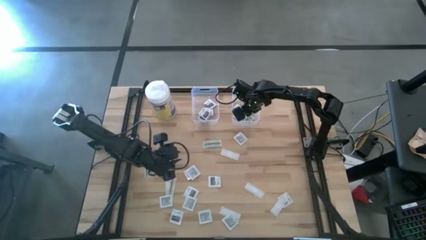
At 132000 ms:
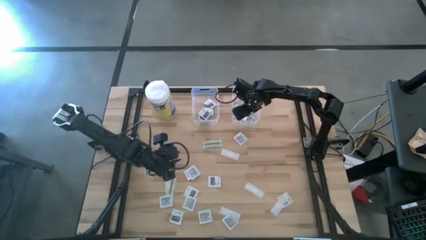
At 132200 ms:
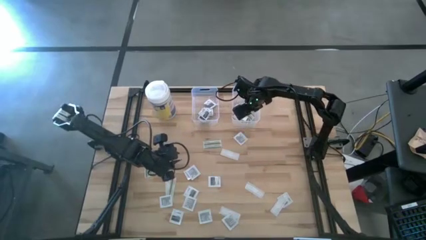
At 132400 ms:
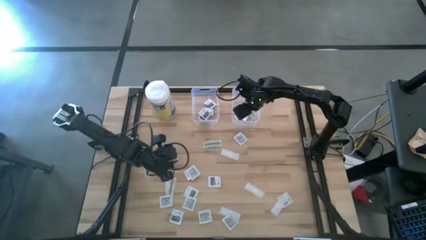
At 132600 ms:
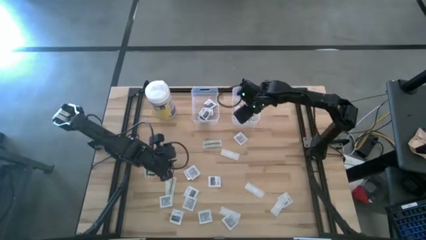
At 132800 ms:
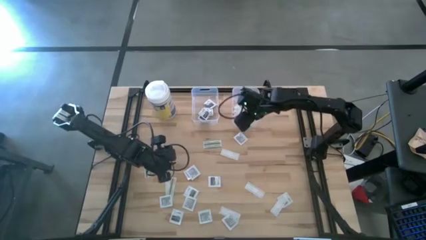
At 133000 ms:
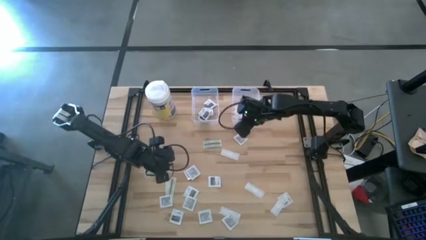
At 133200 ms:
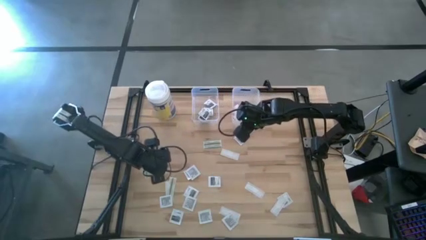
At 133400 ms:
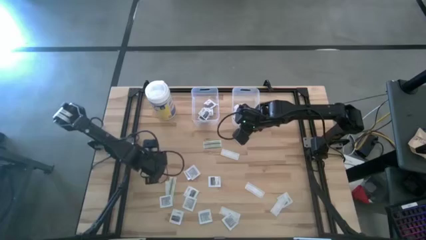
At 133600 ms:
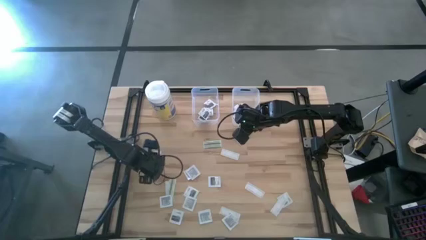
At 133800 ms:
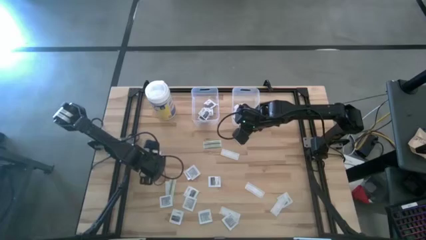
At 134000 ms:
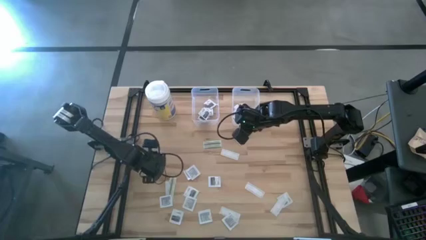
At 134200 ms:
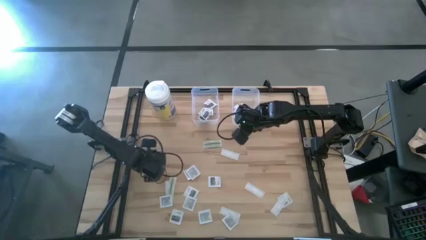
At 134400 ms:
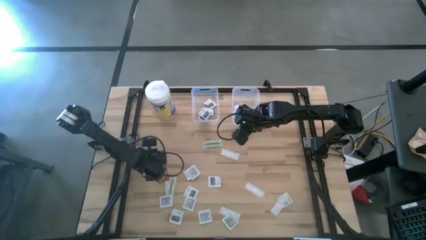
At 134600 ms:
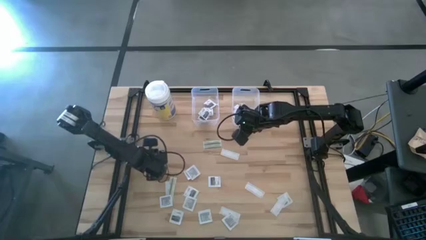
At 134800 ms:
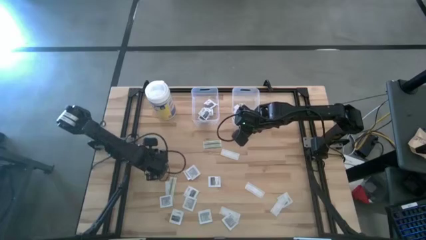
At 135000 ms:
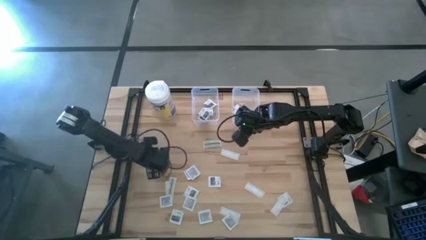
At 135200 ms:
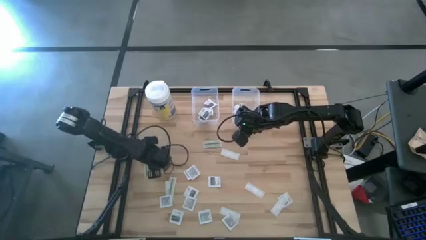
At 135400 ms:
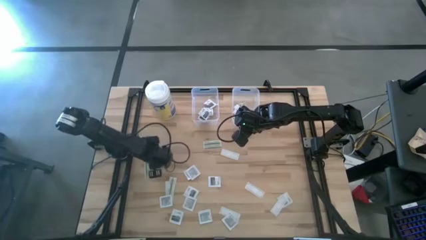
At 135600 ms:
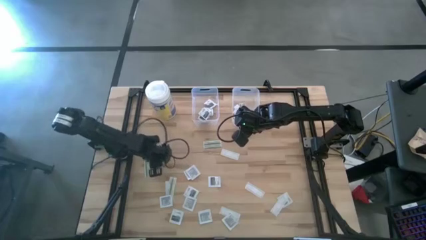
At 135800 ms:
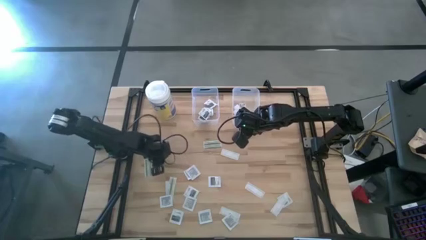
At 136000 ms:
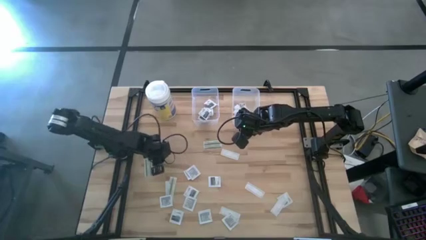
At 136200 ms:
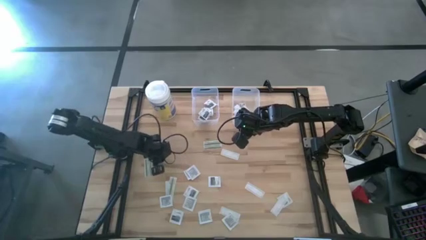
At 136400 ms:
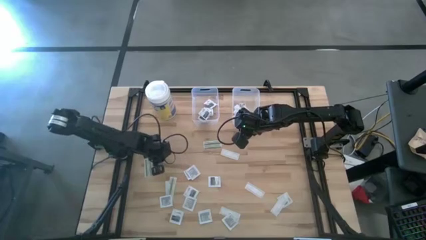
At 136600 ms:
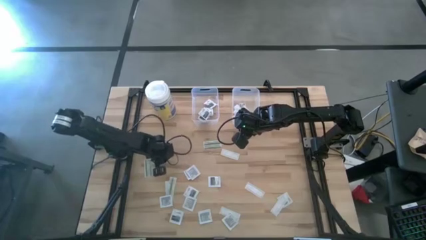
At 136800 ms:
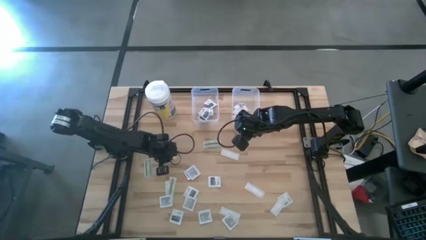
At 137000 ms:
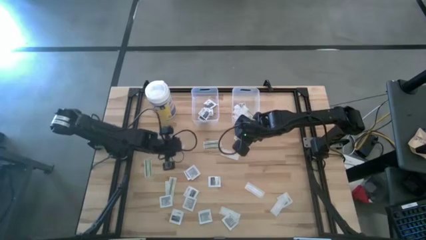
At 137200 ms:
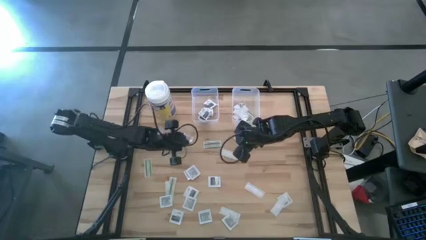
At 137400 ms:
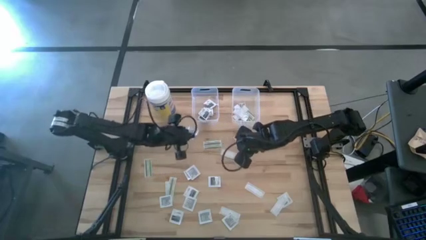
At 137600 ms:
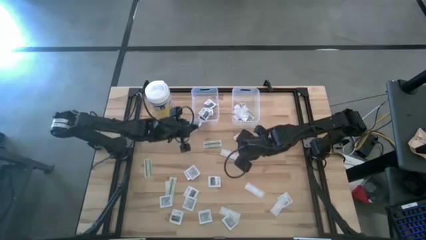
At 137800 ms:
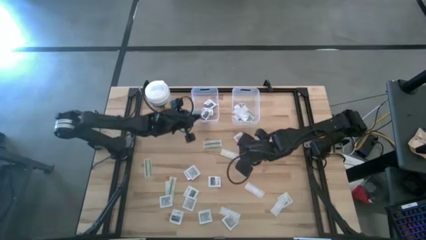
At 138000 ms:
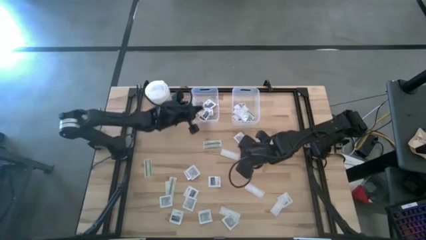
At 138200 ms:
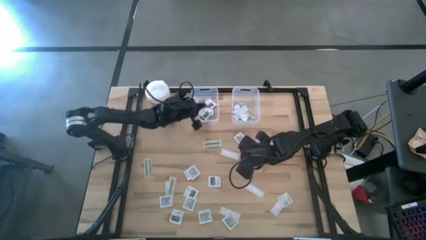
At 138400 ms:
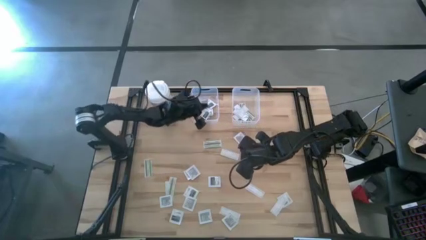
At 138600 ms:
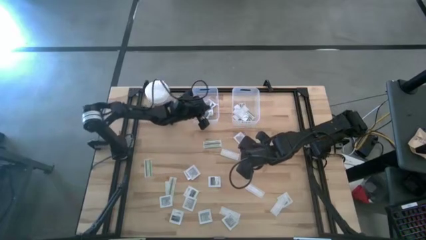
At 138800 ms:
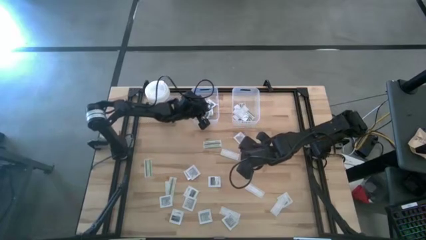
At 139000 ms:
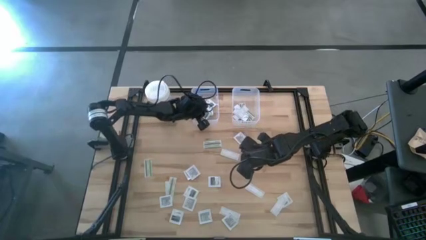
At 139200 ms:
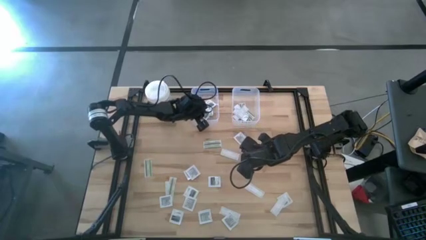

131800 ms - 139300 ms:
Task: Pick & Place First Aid Supplies
Put the towelette pack into the left transparent bin

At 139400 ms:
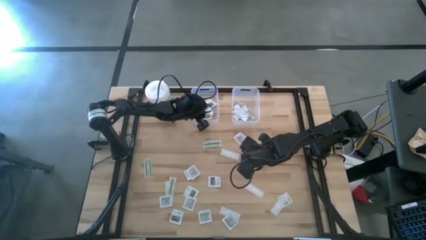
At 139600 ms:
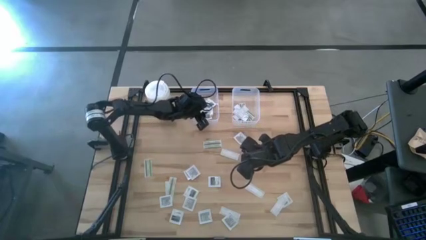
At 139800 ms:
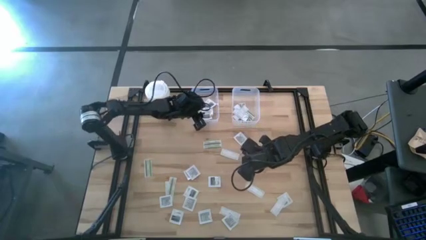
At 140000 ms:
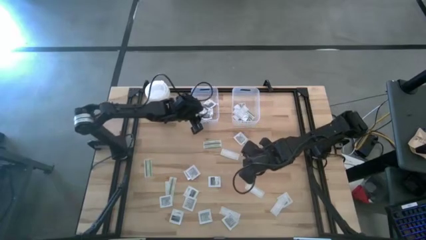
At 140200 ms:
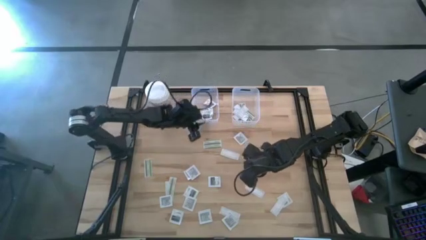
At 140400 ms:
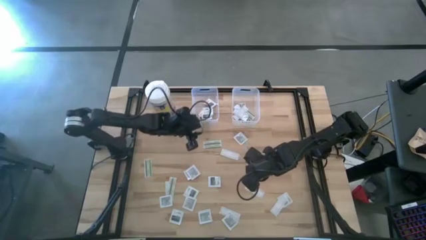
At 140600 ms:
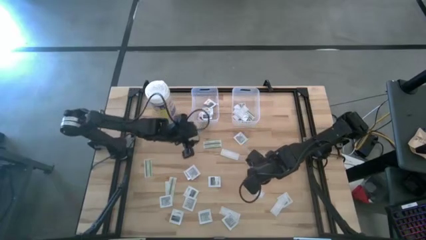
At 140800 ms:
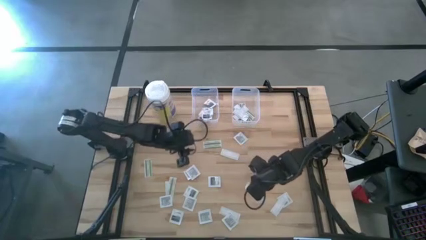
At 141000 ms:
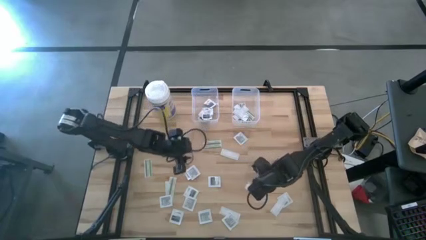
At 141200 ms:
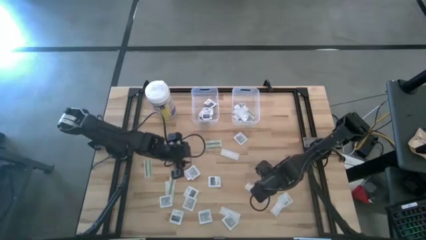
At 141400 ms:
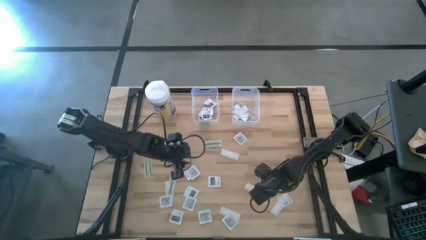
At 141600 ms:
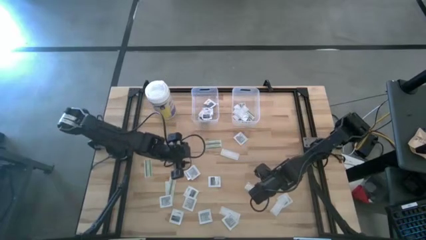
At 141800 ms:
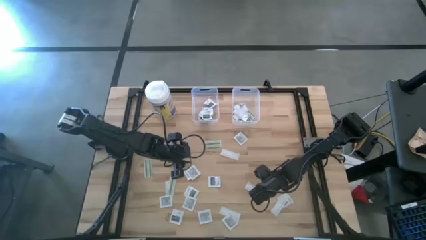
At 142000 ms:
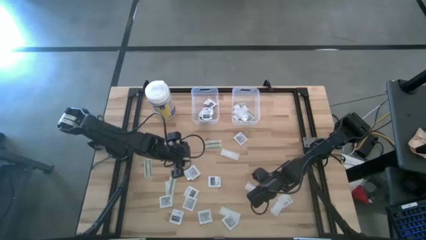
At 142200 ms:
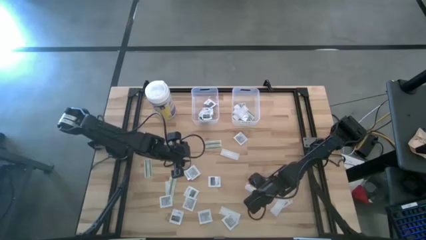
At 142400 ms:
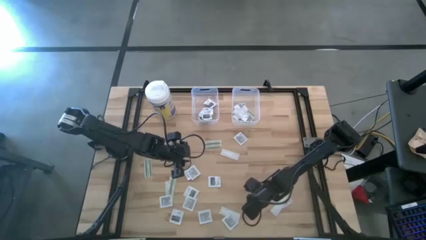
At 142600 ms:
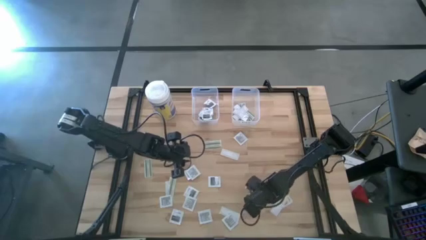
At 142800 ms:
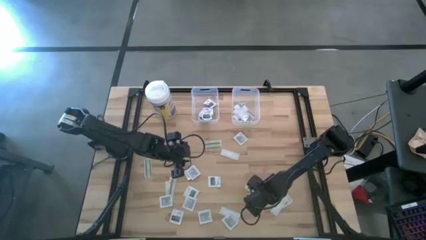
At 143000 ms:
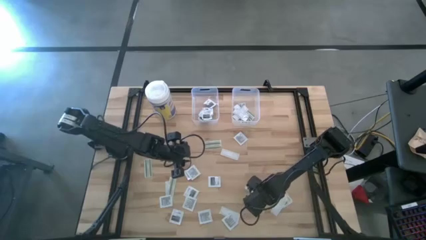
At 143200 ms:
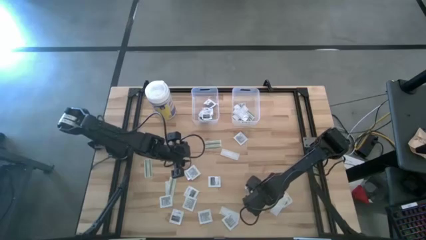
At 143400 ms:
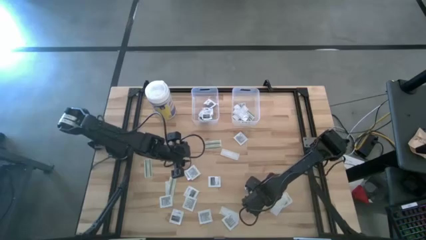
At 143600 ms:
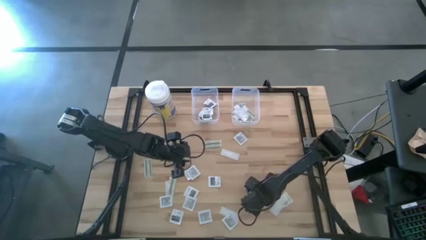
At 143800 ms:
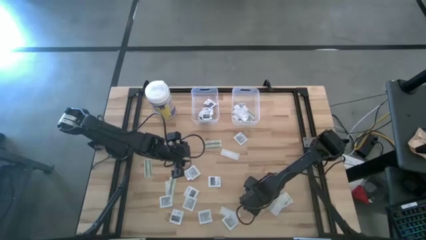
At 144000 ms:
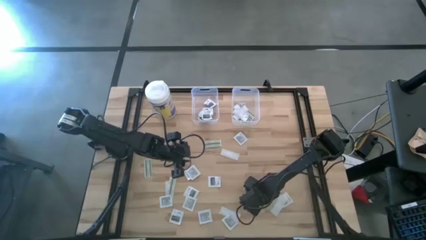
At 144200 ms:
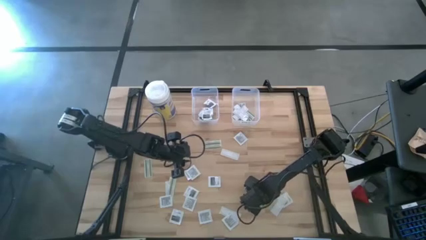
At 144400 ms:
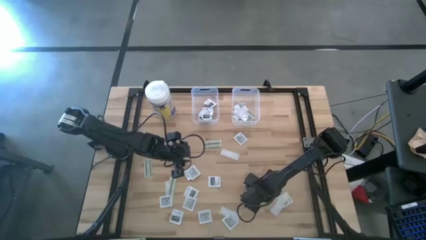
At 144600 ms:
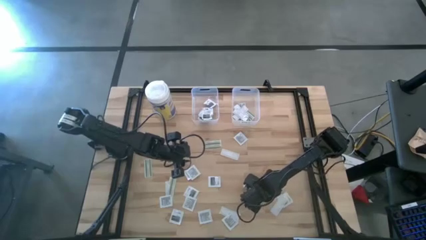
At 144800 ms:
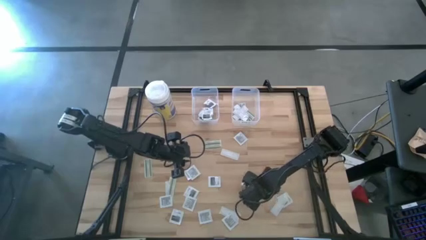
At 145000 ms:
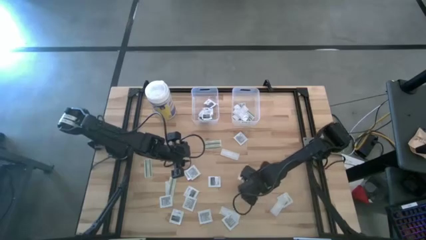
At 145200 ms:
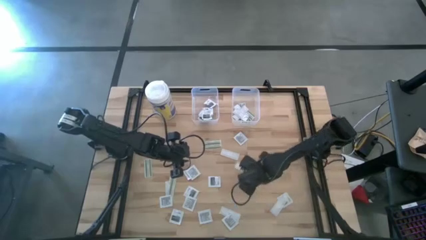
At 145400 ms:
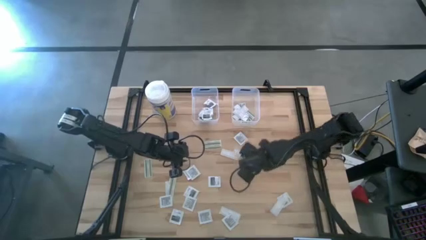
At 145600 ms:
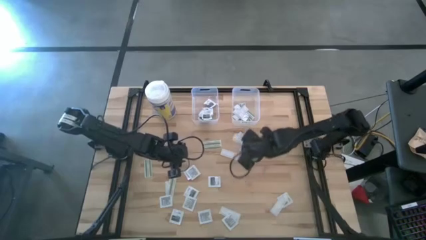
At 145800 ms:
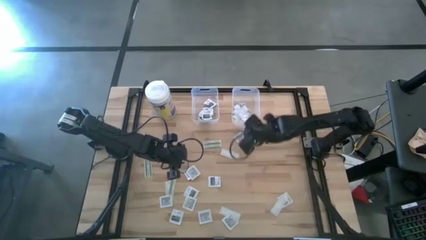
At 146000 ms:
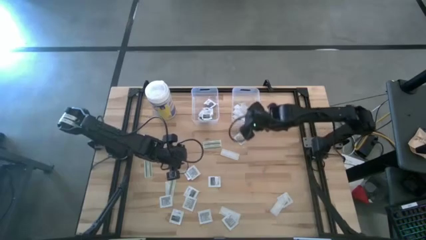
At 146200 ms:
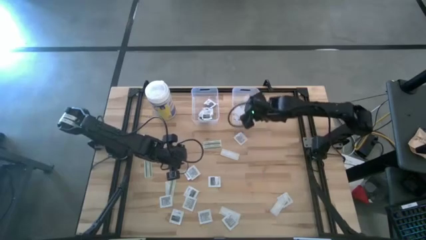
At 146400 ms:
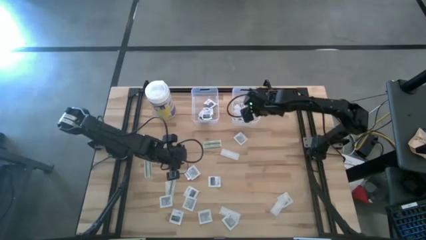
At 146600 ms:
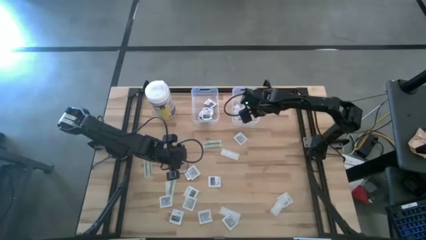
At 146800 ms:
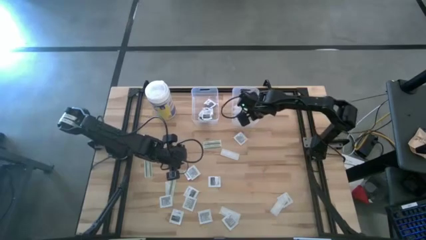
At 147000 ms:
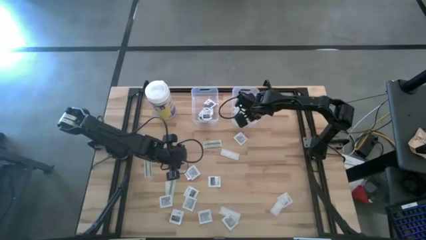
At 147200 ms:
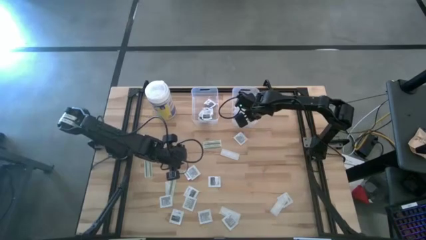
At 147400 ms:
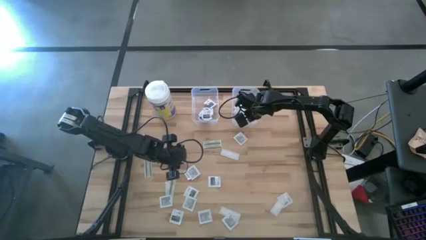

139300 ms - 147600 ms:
Put the bandage into the right transparent bin
